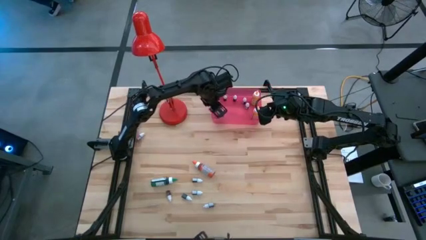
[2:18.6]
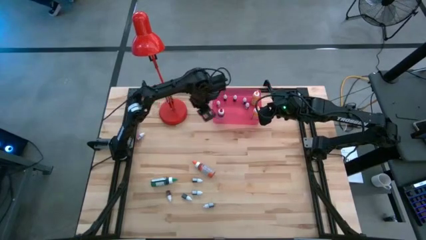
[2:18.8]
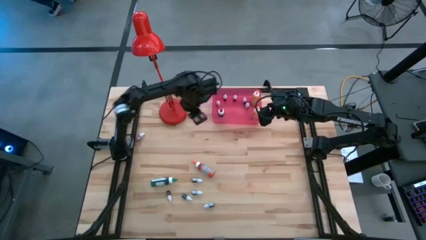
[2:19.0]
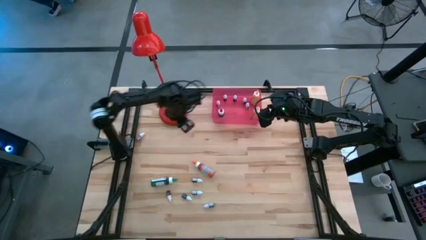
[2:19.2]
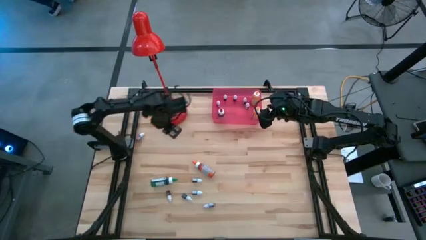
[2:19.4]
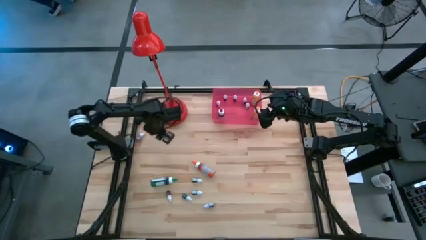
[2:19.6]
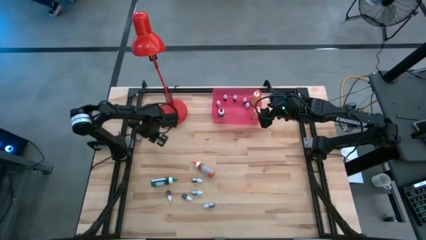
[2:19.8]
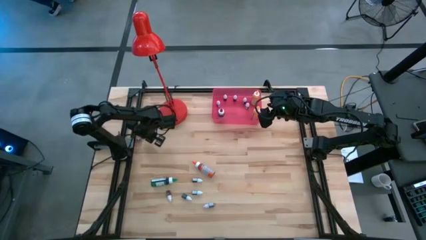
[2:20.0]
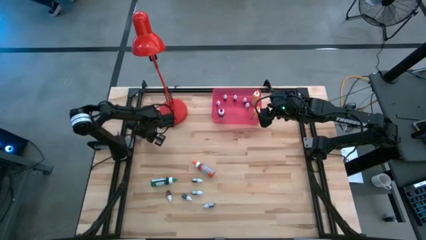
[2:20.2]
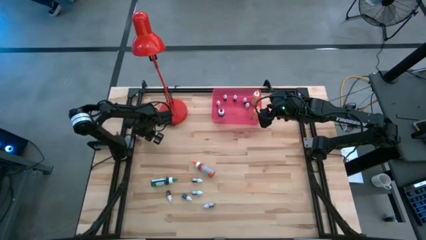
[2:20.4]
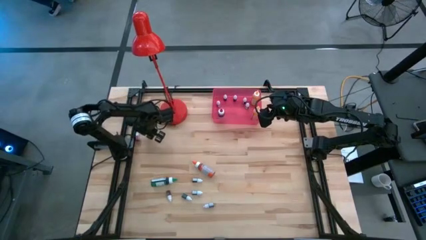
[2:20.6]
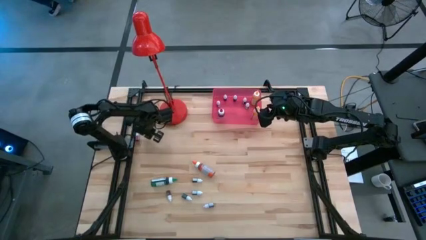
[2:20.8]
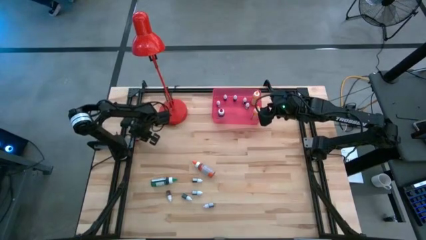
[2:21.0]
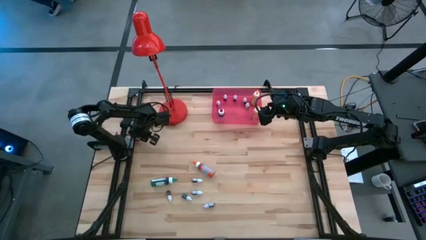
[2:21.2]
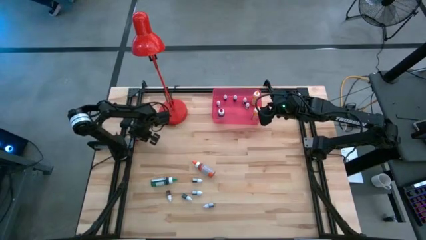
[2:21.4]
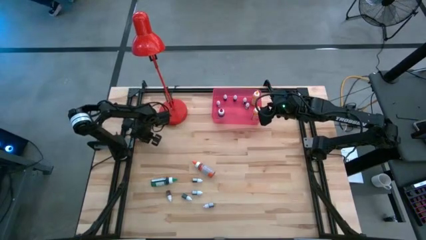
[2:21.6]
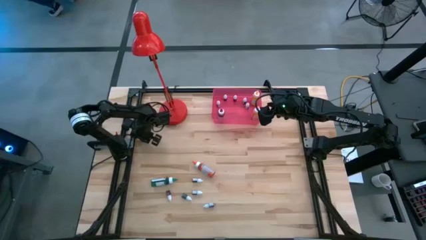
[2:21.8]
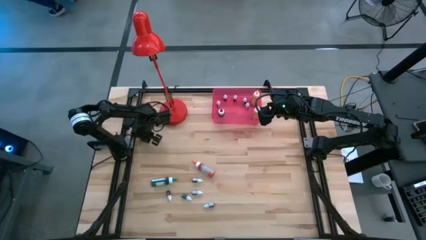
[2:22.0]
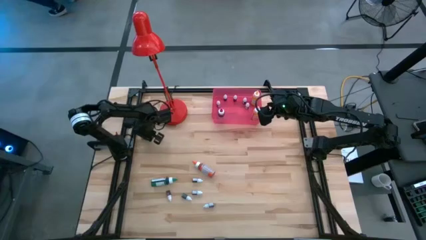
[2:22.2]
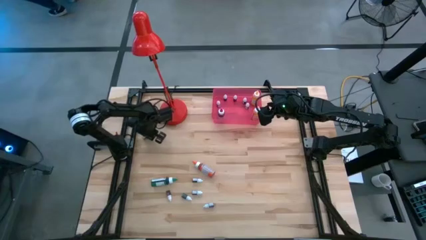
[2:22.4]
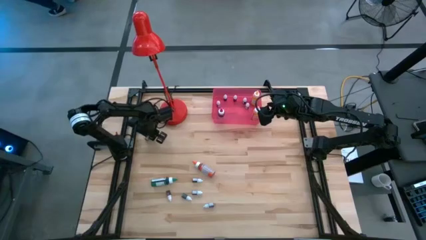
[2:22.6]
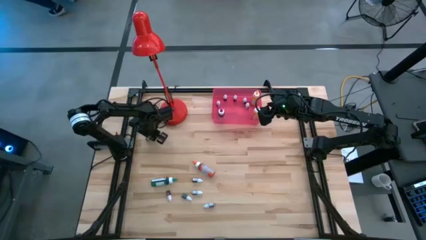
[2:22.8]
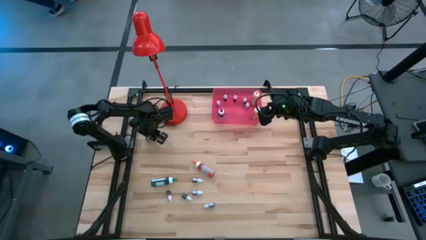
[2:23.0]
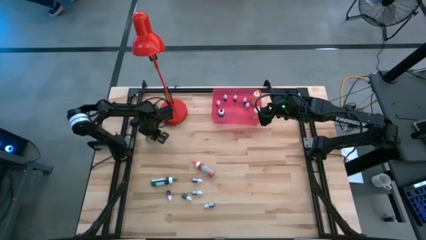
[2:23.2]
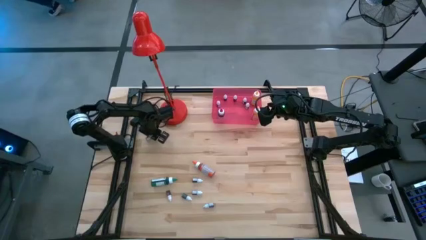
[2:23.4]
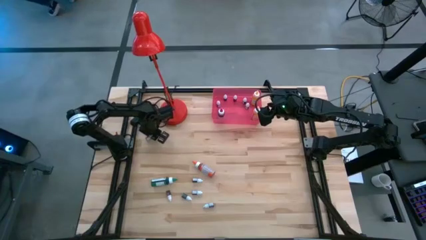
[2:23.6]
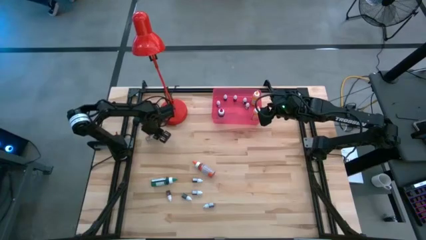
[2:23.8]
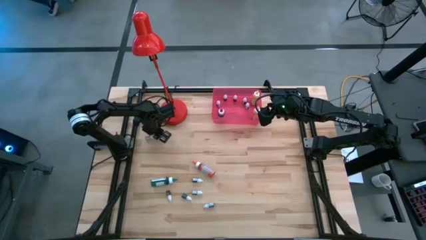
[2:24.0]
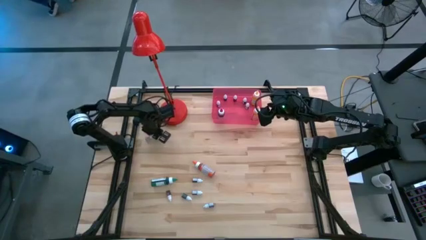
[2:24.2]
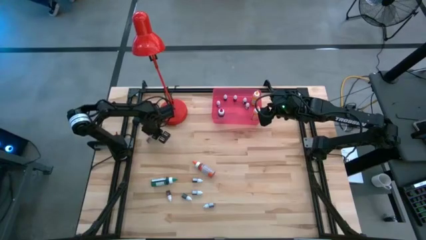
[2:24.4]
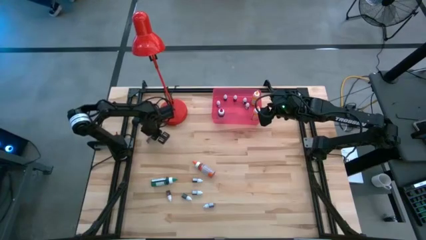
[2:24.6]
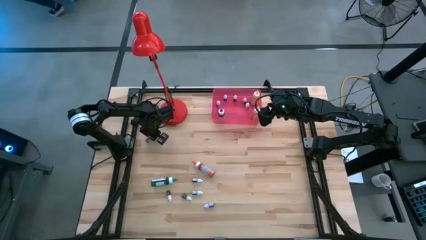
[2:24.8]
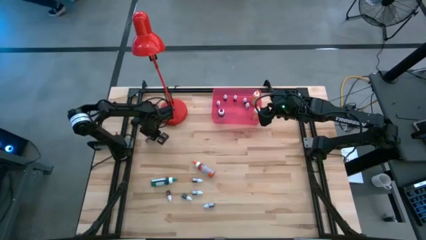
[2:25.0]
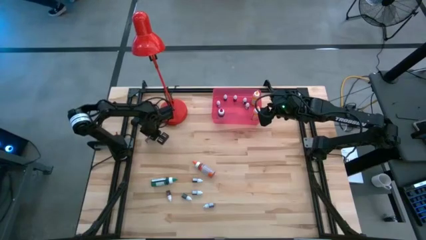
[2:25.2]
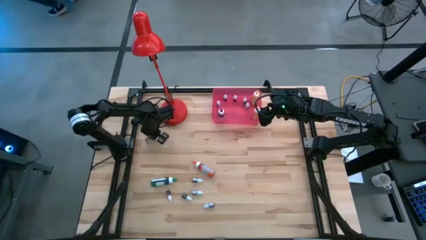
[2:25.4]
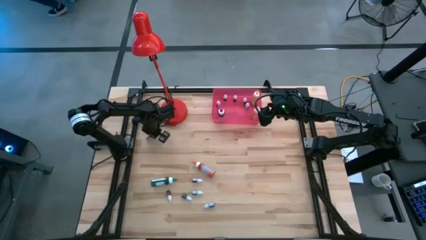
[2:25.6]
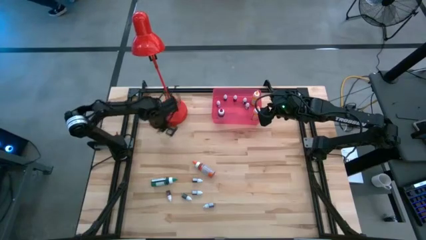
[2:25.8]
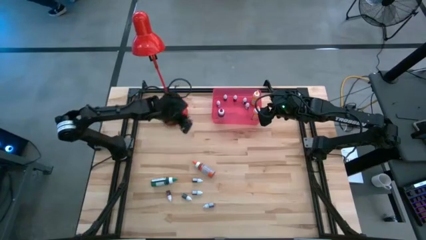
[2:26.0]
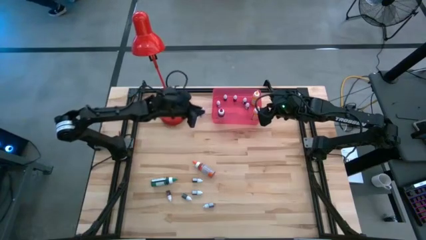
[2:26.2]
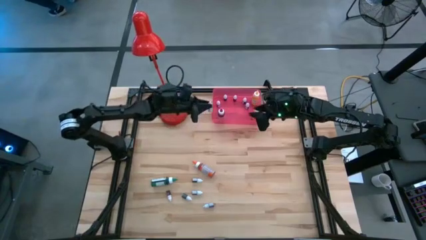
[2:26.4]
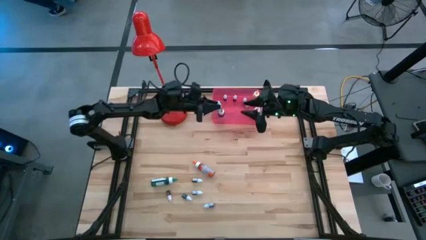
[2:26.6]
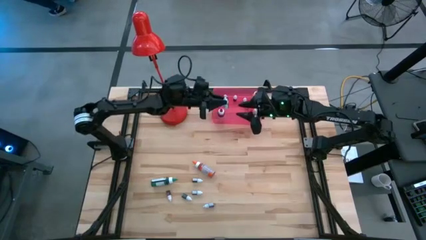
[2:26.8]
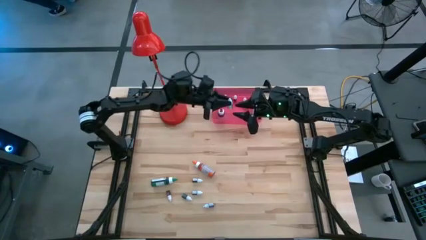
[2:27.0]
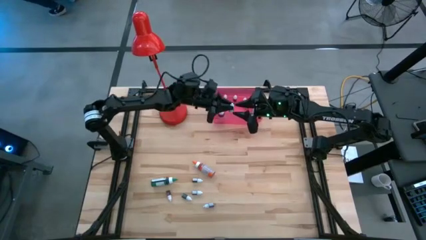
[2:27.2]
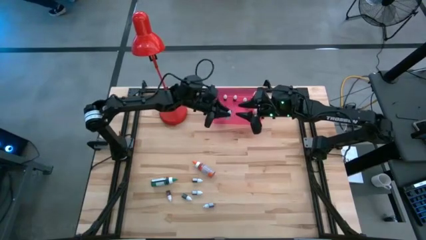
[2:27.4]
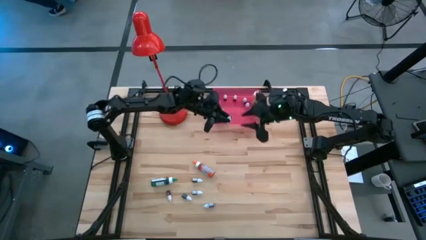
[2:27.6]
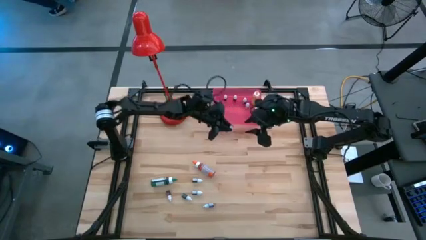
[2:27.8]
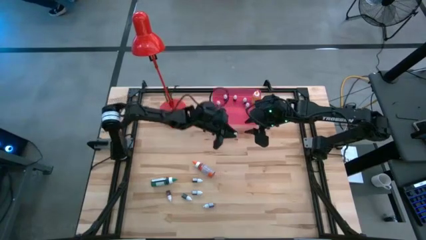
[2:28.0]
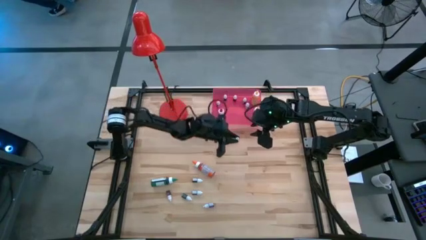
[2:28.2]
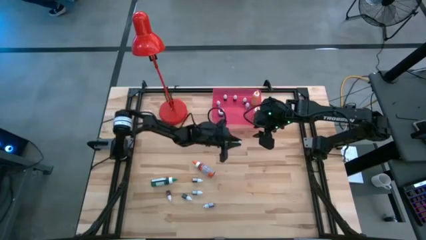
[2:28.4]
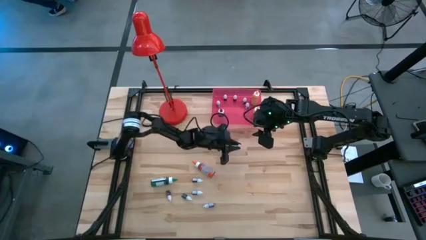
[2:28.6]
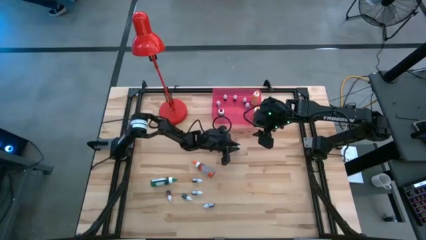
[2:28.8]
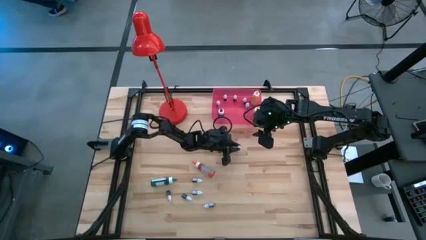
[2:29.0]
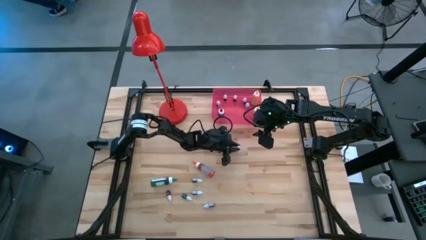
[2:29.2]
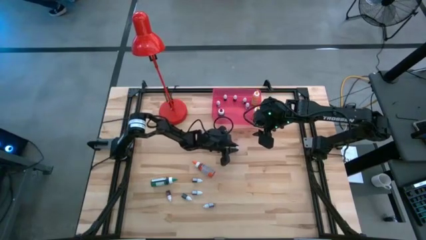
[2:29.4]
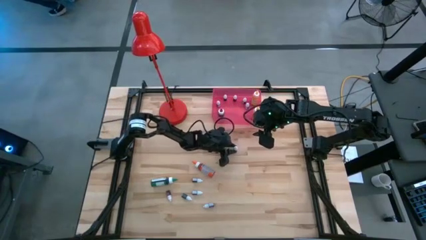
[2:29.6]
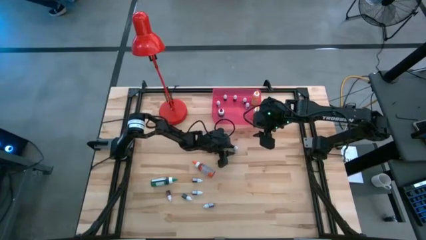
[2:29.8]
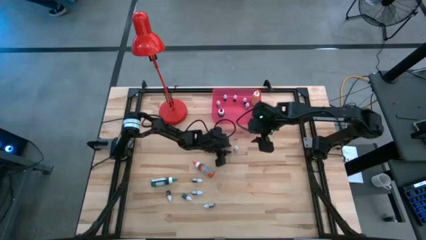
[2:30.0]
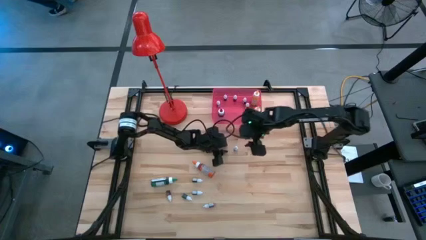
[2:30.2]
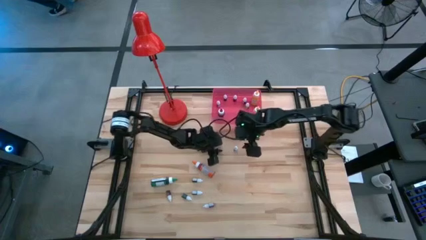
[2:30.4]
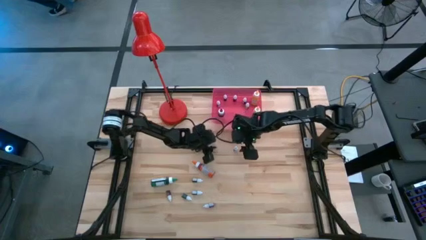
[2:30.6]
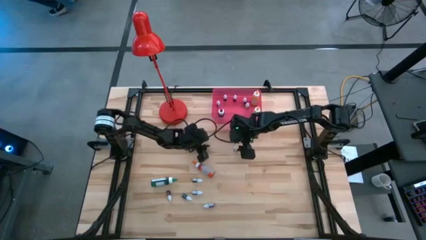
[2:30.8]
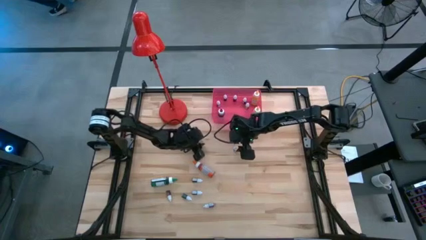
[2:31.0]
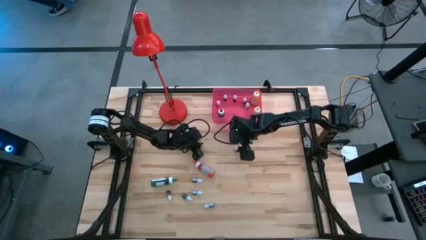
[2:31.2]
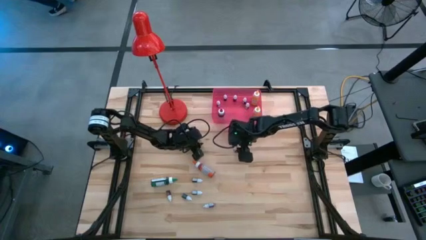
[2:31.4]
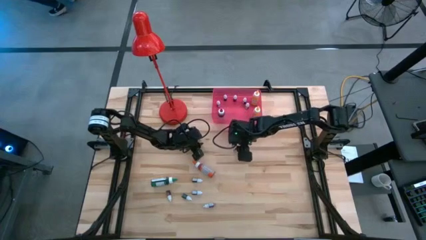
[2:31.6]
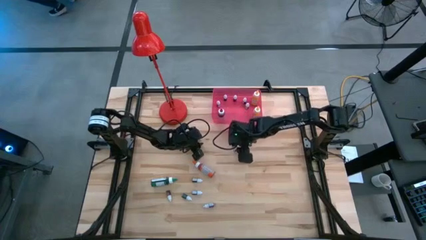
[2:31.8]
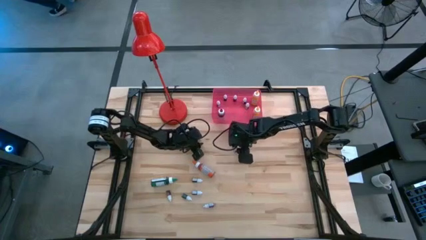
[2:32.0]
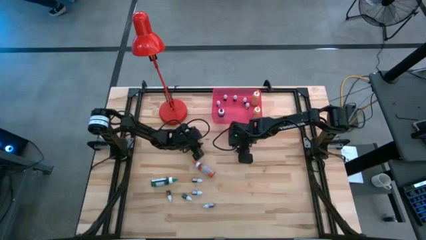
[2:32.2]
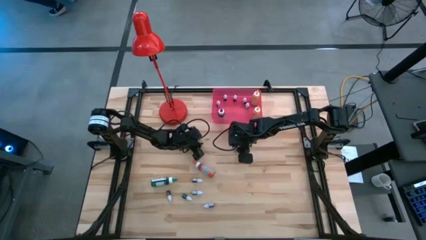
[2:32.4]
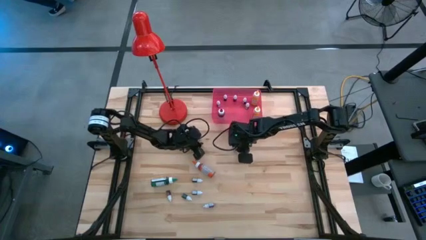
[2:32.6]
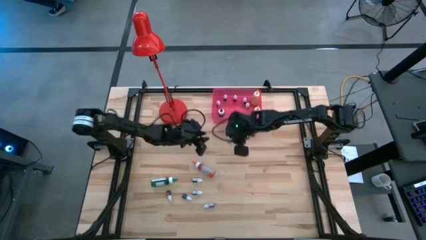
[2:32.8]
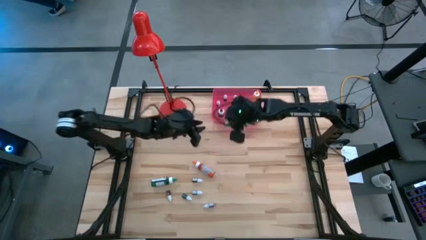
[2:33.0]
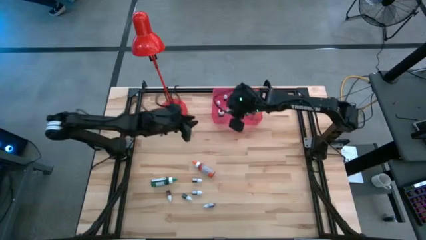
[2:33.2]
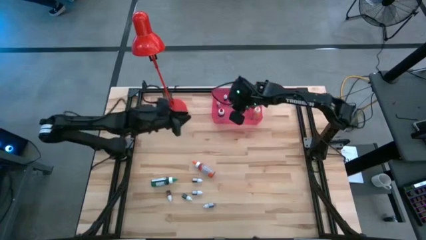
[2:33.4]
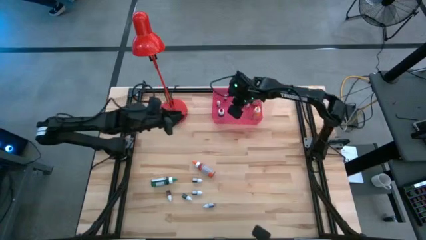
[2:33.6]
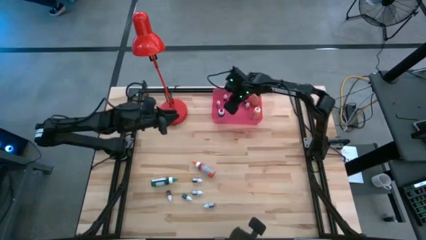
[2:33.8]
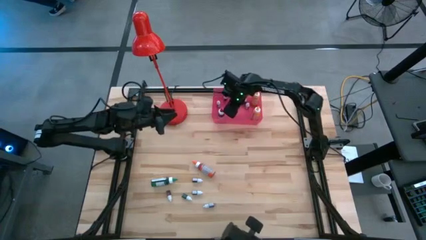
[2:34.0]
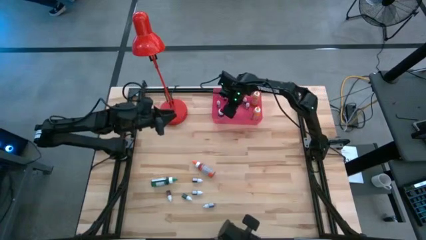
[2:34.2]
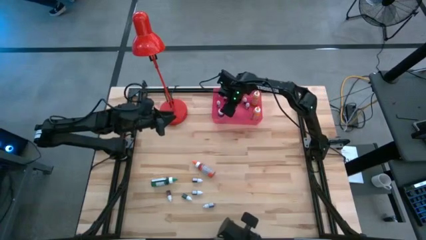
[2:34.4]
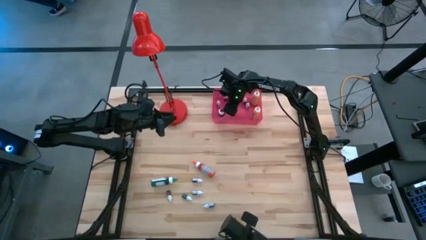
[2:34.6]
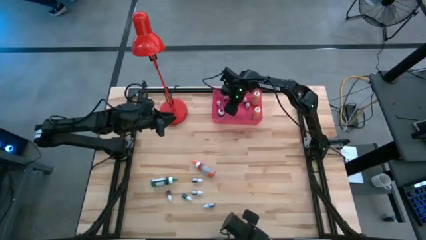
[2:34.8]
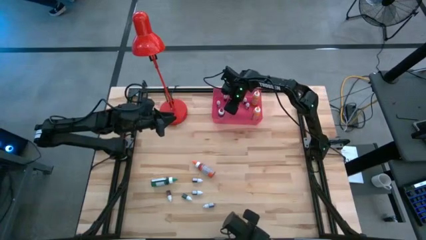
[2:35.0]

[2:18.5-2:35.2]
Task: Pick & Place food coloring
Put the small red food coloring bottle into the red bin
